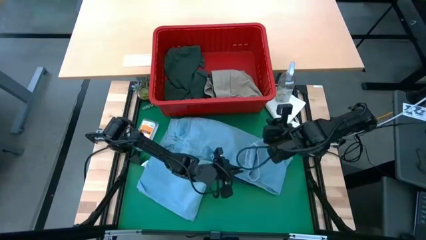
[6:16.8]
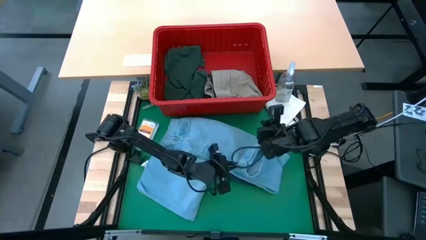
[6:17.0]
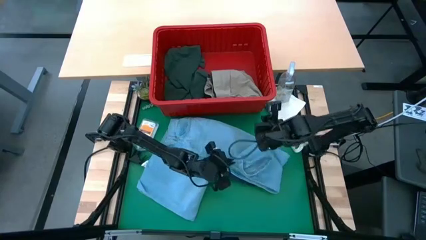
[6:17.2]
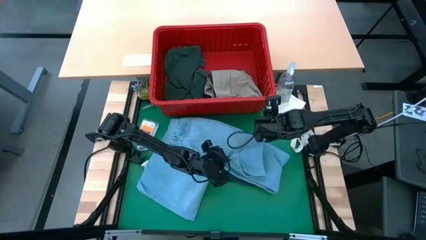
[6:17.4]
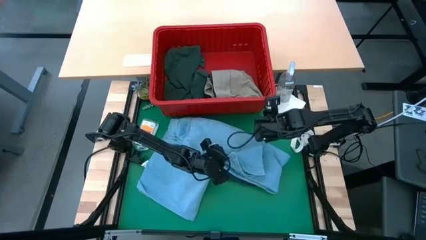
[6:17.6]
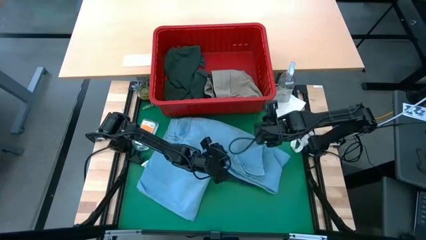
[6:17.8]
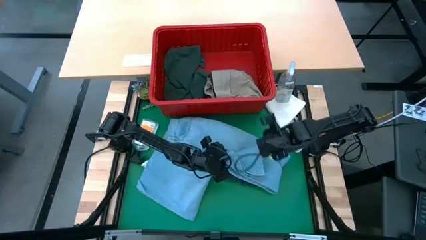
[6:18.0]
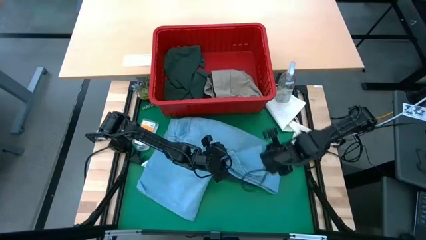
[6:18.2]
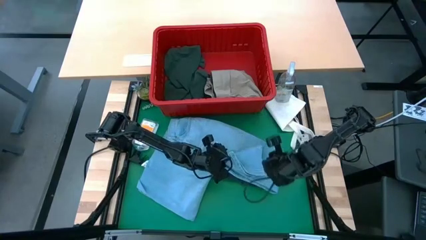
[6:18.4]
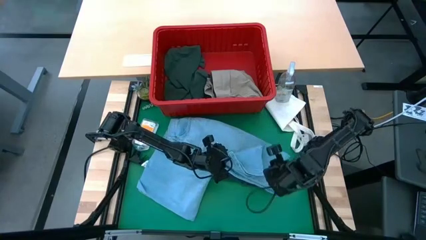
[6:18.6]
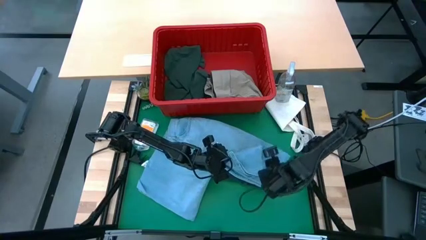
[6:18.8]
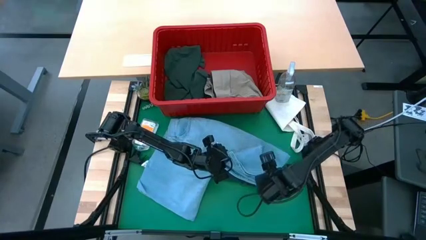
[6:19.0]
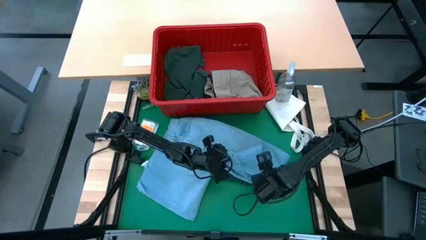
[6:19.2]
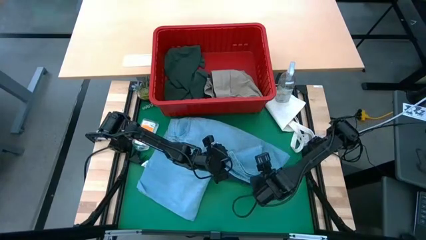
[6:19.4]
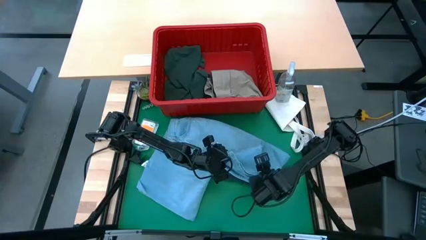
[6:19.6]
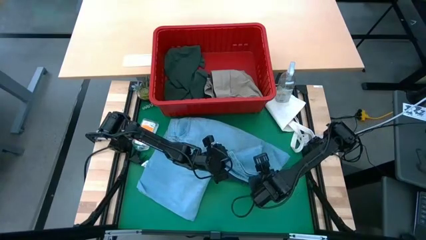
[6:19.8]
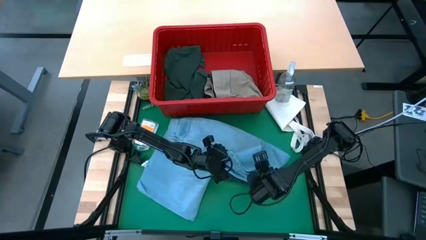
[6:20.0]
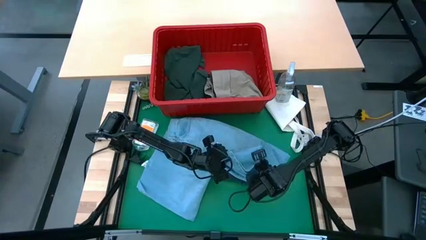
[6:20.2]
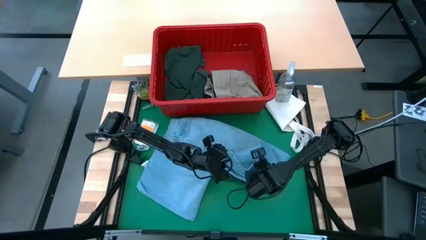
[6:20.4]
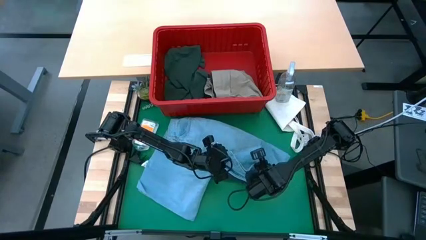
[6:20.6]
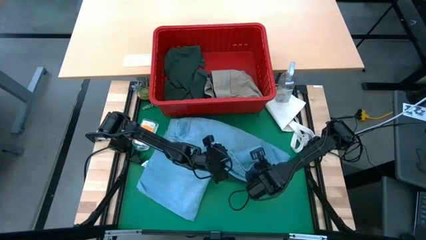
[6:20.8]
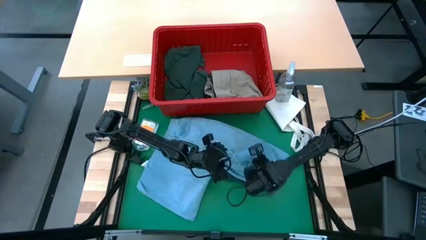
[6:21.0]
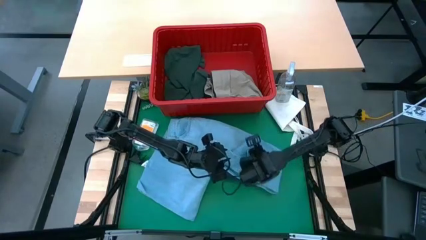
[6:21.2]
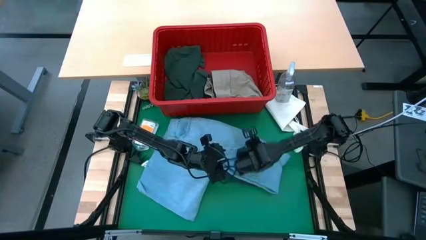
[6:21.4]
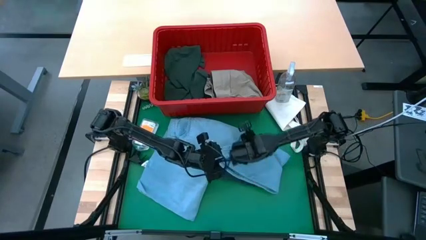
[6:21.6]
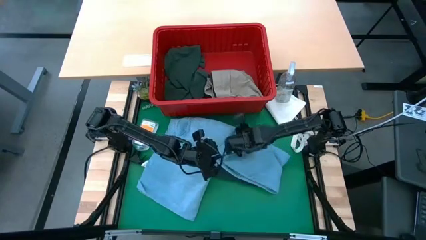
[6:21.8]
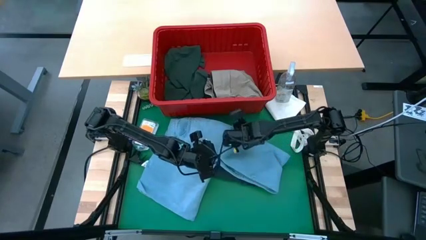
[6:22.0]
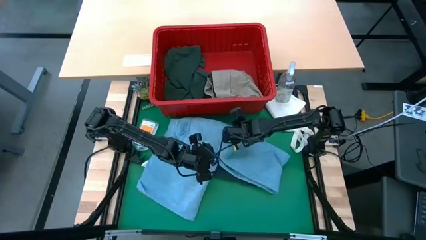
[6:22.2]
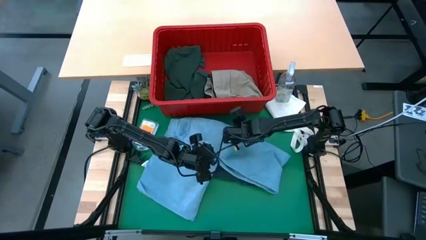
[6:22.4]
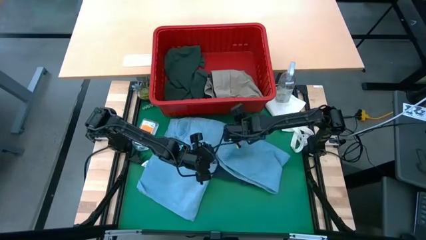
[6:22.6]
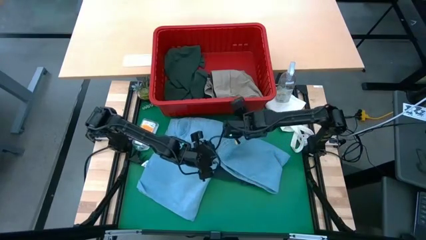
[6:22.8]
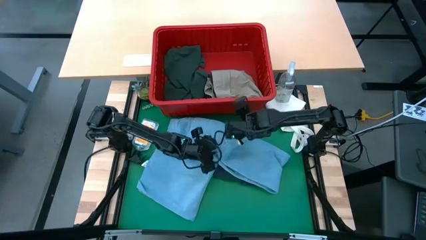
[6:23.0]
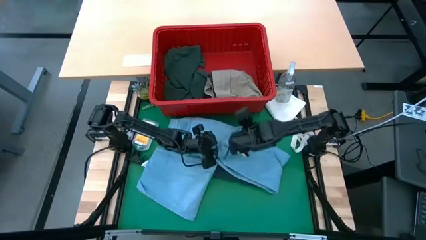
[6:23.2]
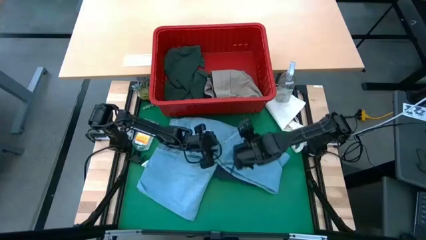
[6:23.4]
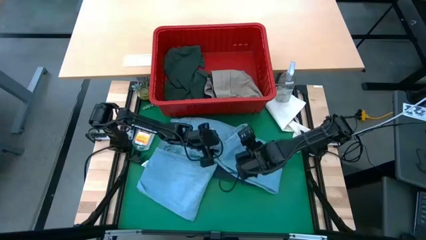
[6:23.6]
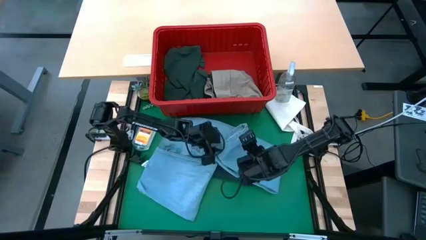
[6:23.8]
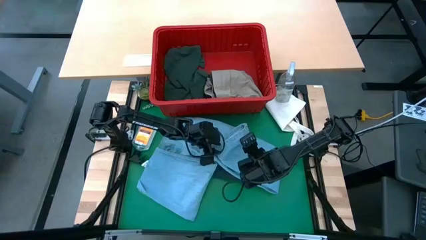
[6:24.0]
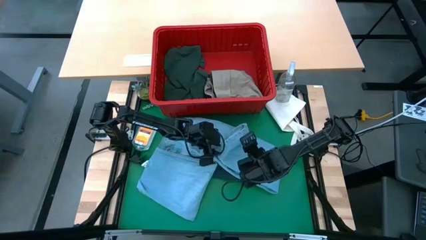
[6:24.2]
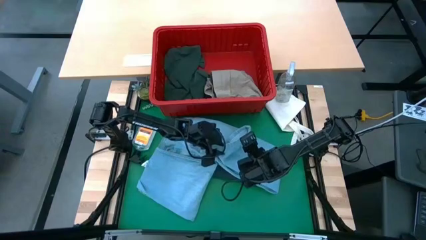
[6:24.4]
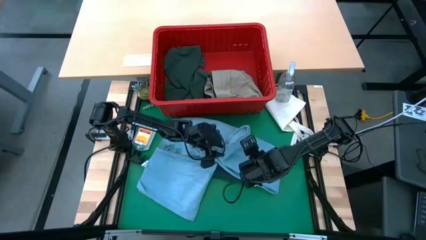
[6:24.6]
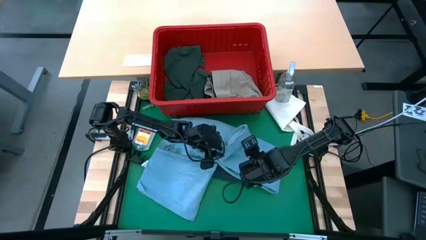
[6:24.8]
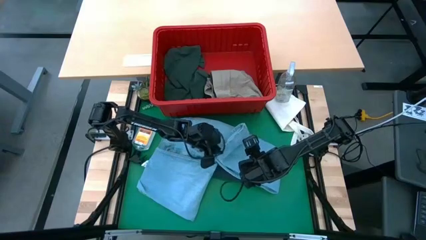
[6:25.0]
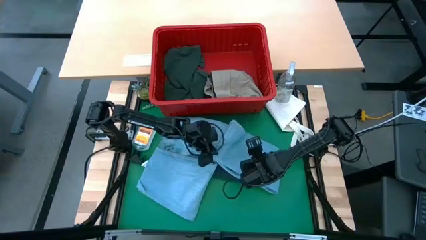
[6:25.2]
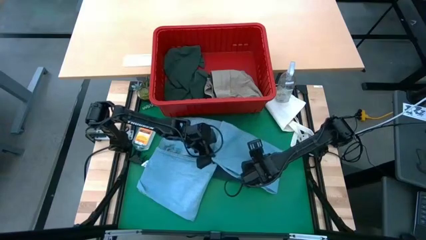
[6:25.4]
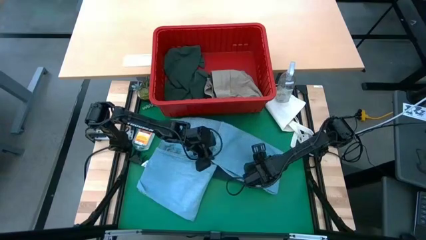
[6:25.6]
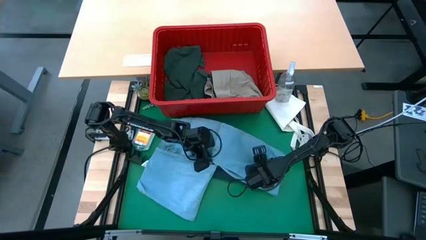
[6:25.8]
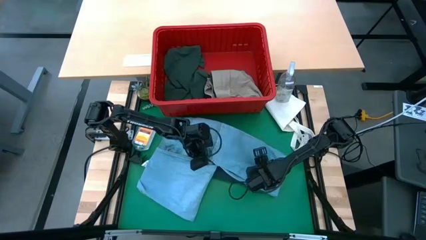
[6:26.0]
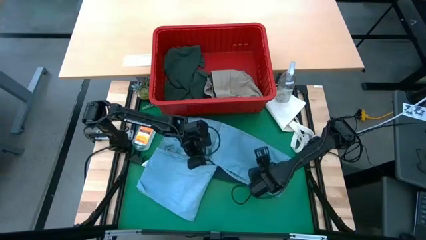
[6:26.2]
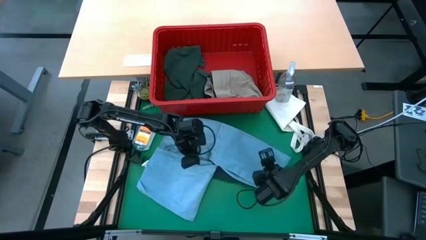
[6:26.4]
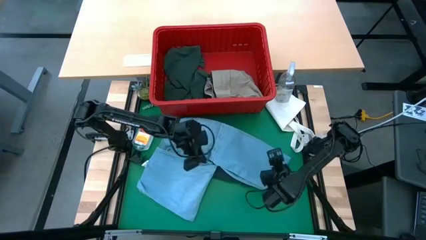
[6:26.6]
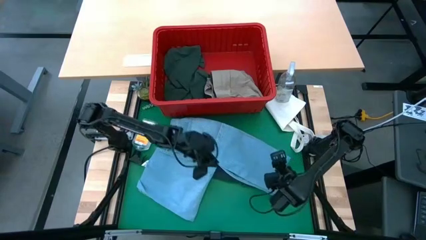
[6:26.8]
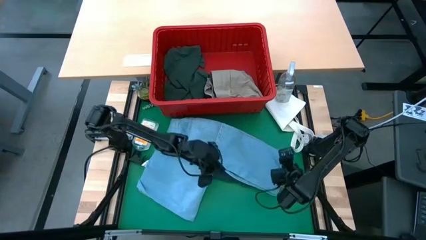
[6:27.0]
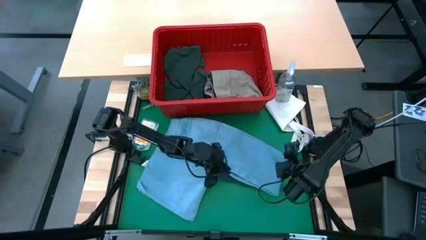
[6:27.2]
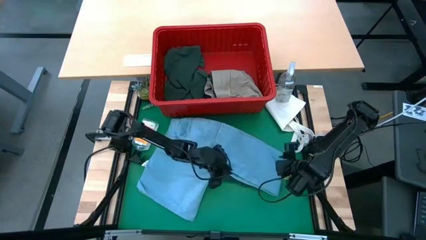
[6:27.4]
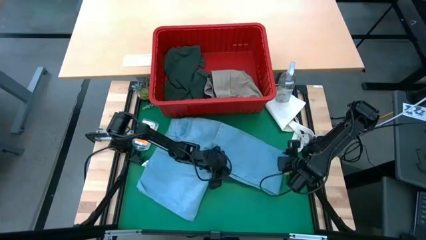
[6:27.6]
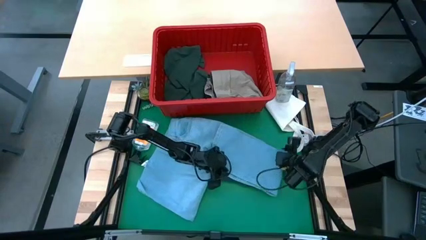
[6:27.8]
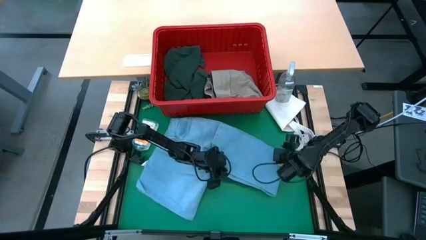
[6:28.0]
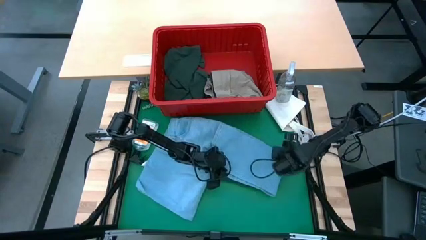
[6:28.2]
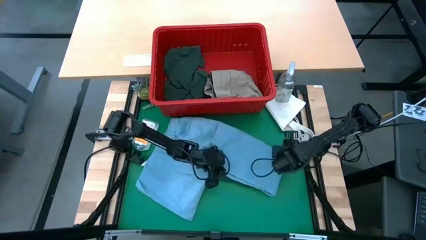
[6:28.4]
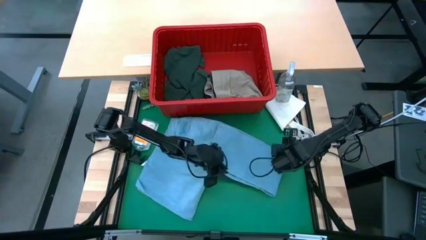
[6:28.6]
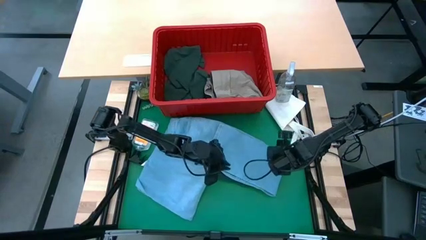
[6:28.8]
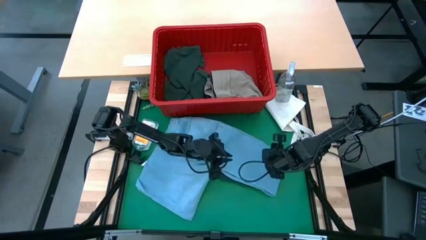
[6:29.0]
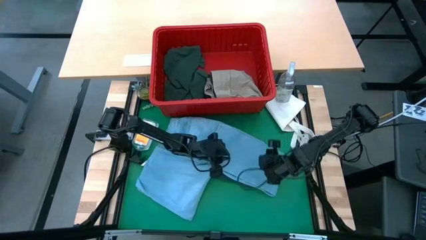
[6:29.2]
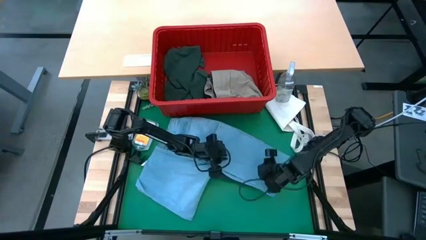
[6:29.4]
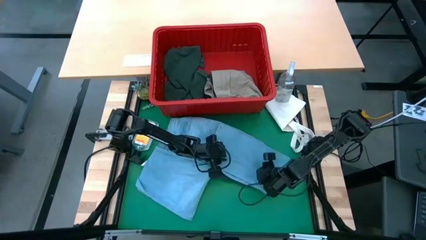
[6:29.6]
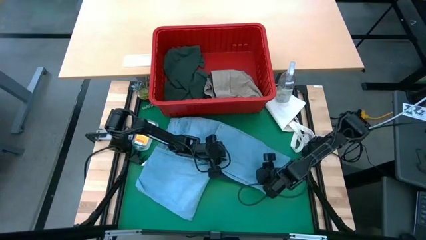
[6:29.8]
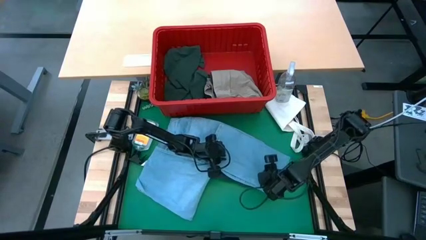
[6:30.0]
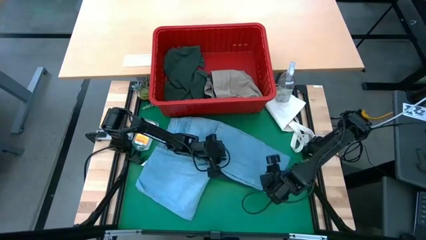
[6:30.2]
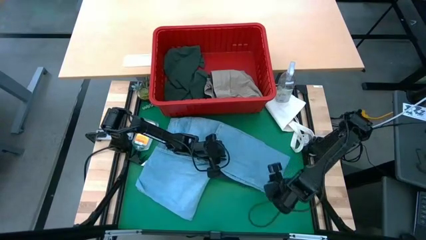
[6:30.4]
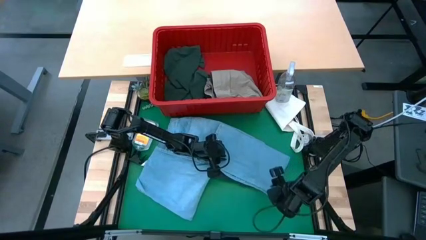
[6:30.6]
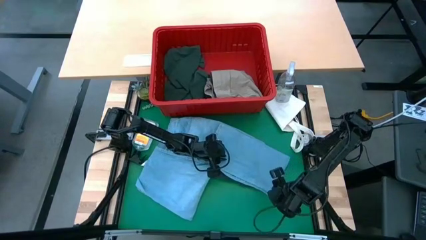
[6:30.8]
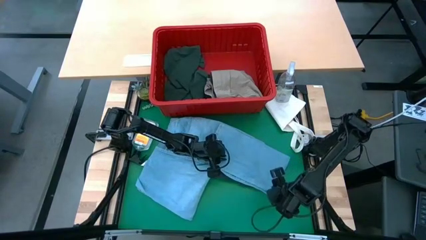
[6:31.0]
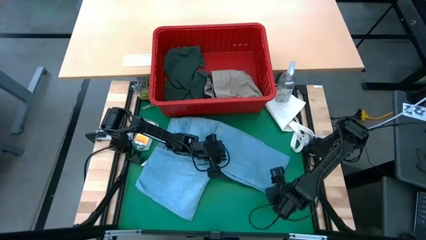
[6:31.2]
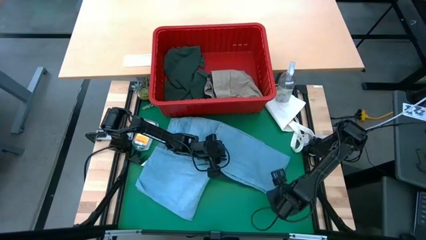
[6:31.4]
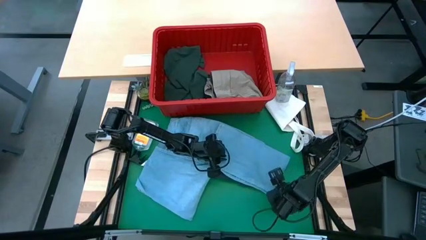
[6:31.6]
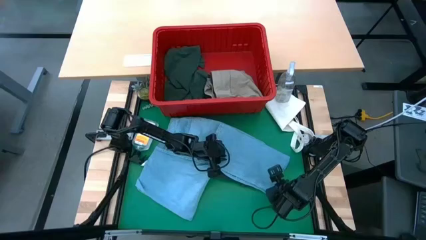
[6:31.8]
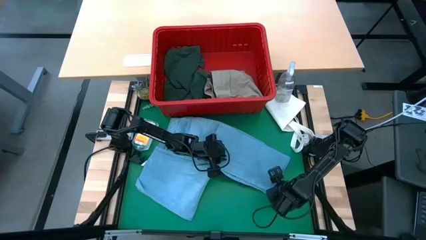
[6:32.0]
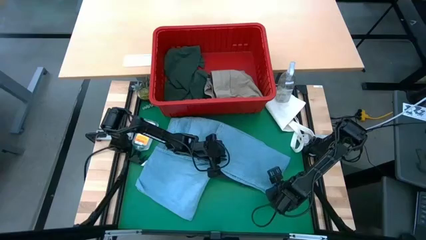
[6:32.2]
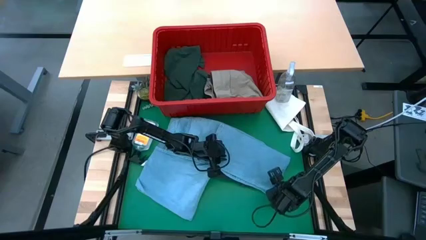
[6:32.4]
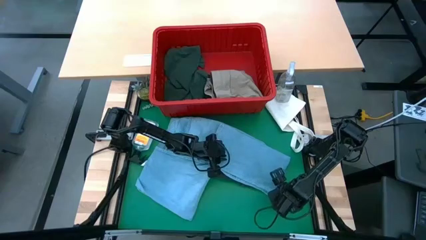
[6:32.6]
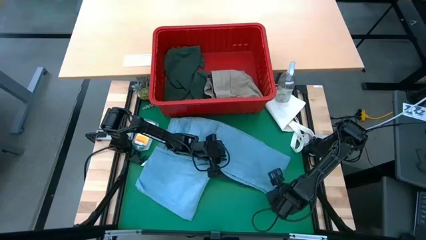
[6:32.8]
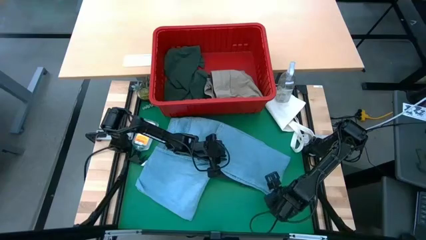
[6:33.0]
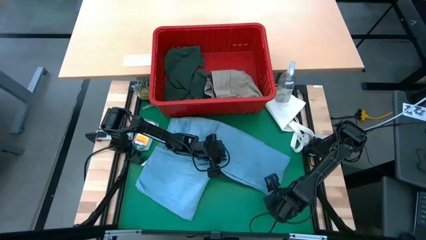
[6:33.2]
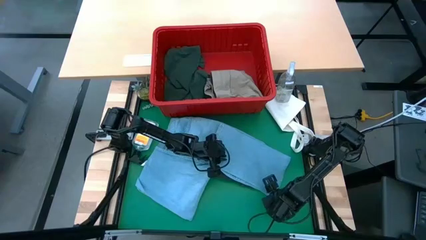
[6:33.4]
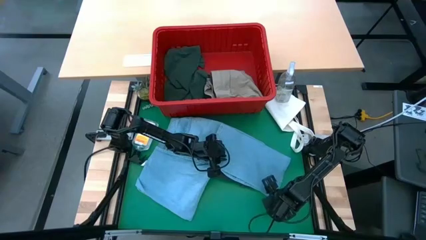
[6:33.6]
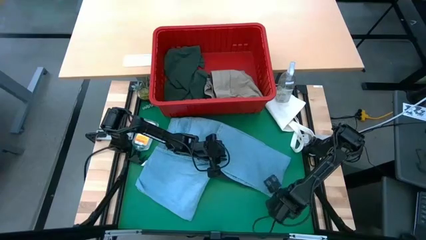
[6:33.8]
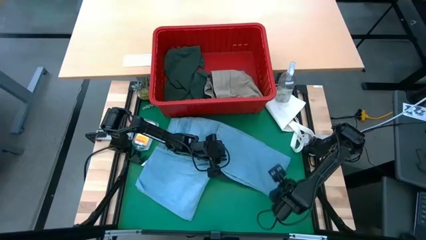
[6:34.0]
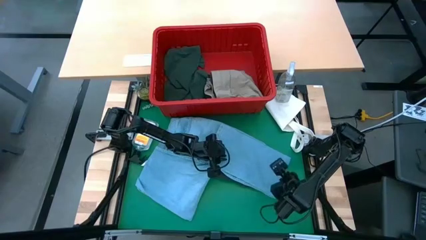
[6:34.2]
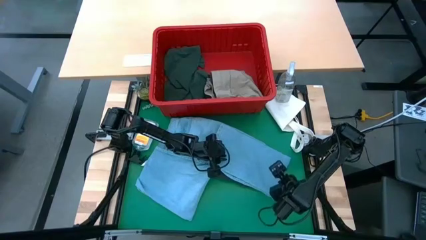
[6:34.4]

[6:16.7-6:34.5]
Task: Fold laundry
Fold the light blue jeans
